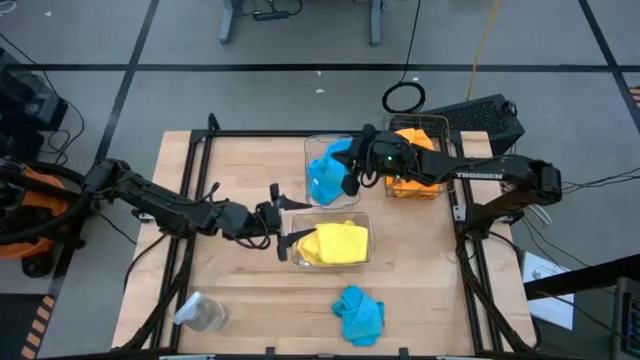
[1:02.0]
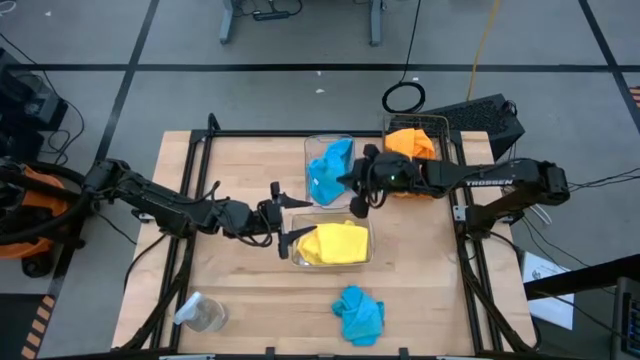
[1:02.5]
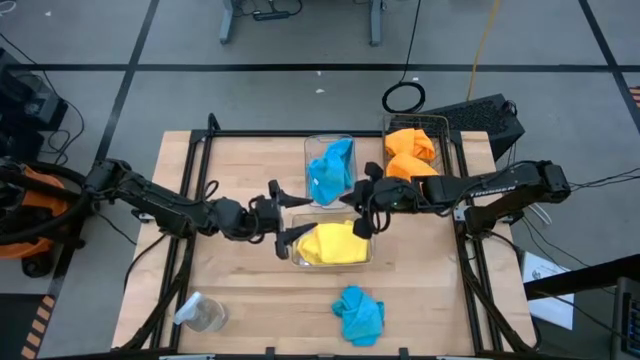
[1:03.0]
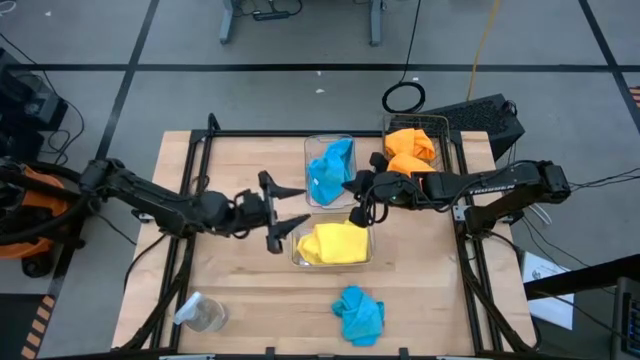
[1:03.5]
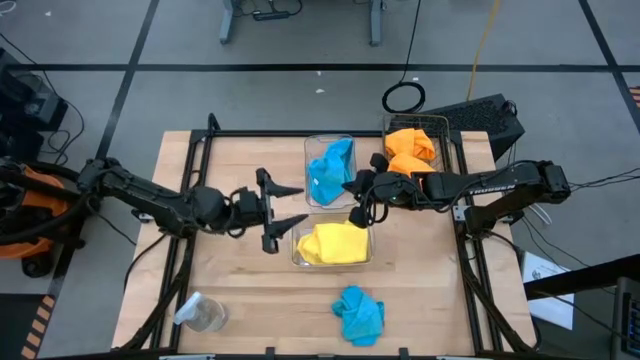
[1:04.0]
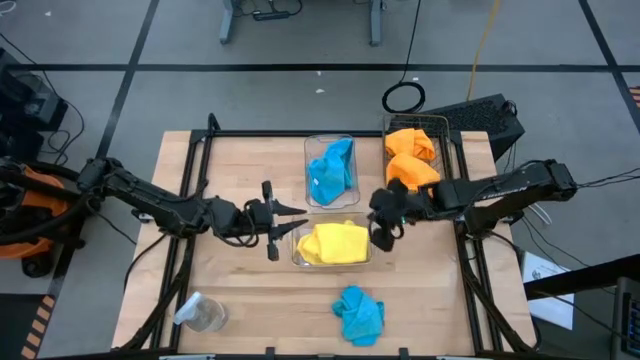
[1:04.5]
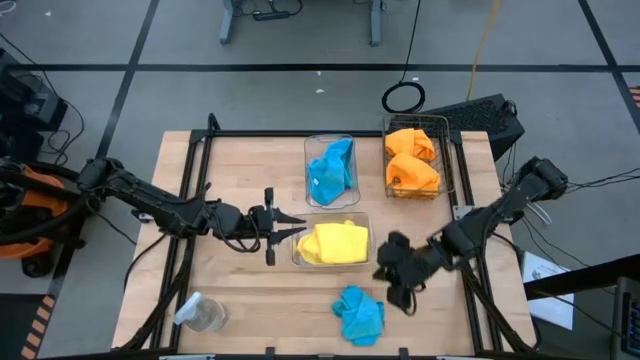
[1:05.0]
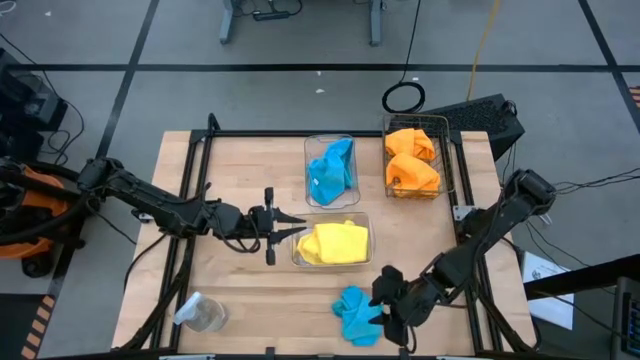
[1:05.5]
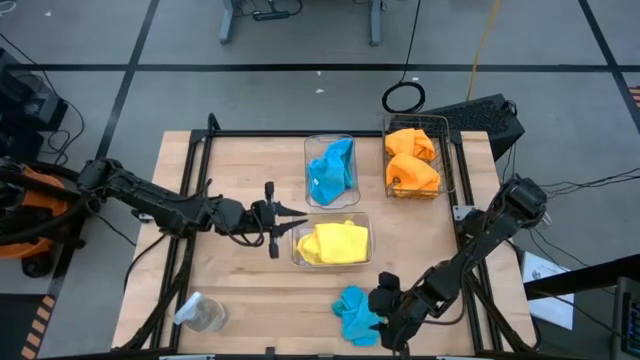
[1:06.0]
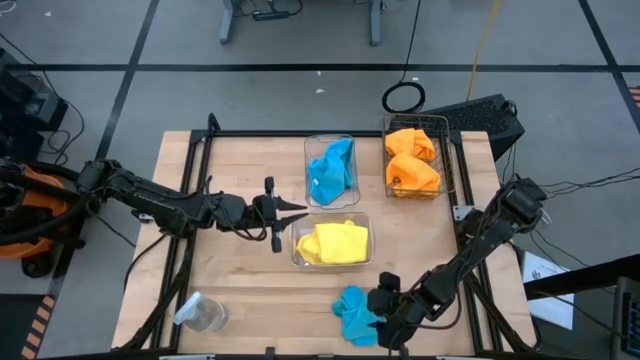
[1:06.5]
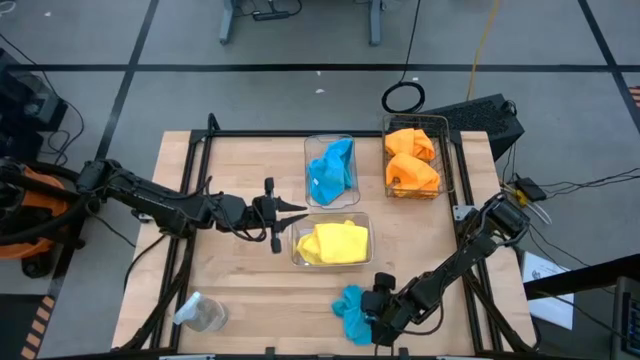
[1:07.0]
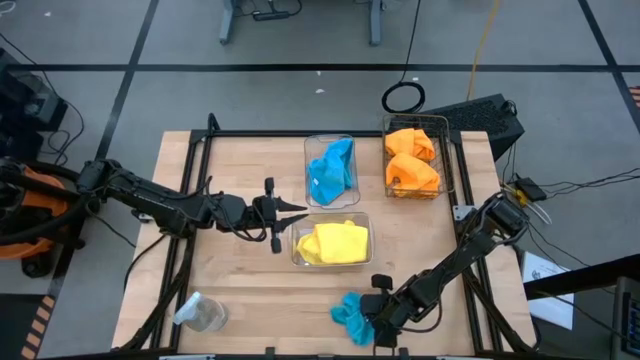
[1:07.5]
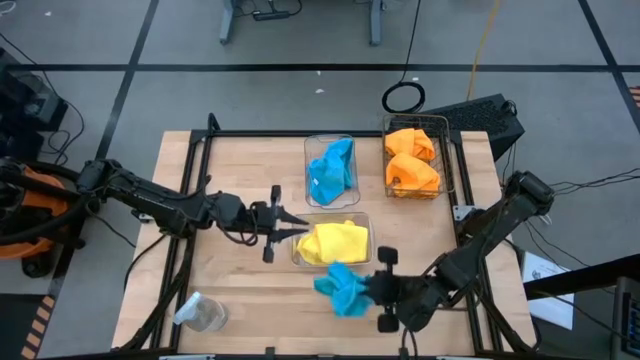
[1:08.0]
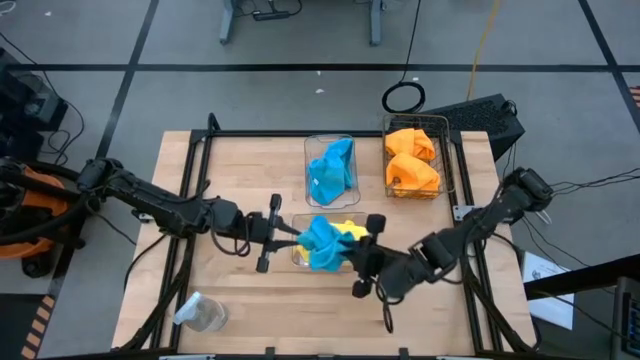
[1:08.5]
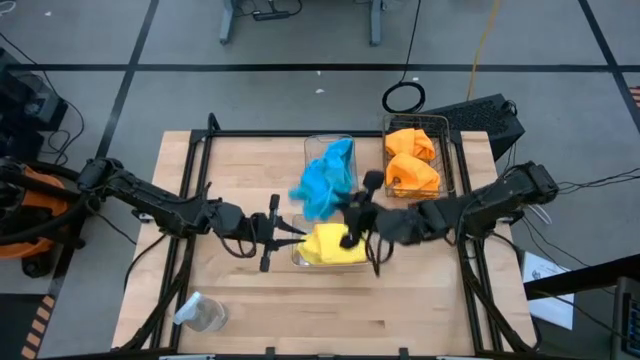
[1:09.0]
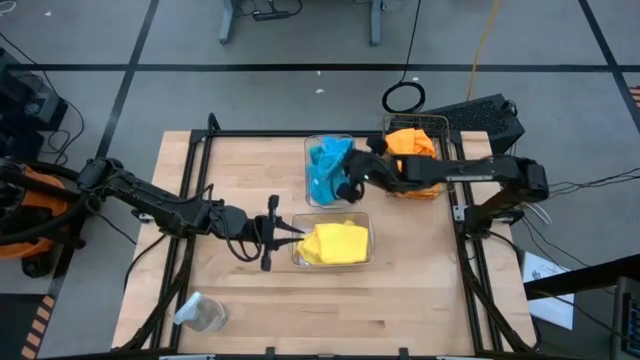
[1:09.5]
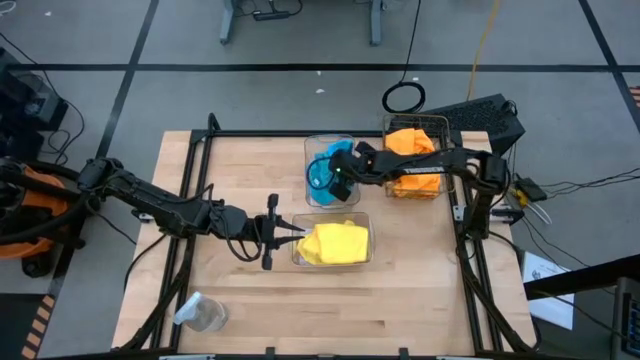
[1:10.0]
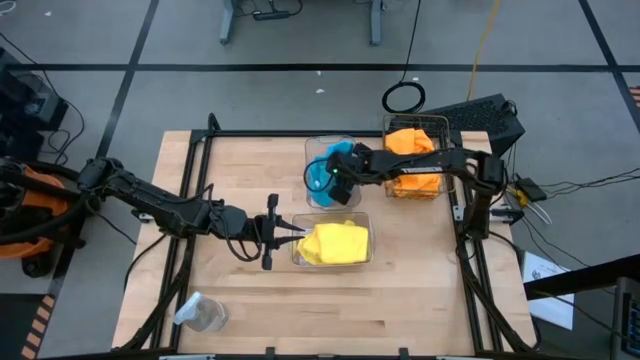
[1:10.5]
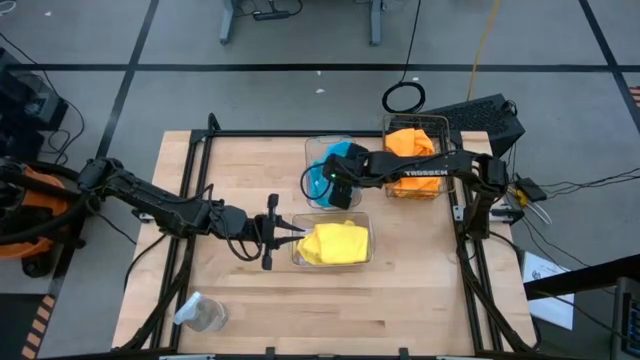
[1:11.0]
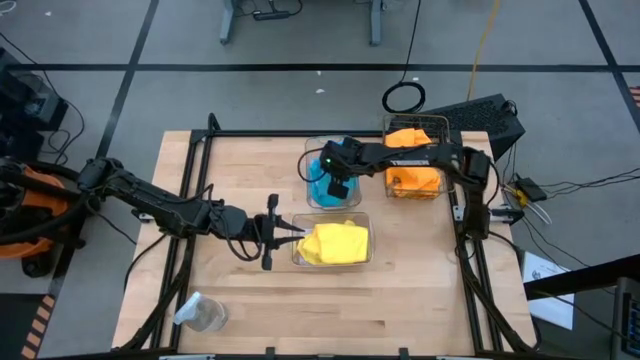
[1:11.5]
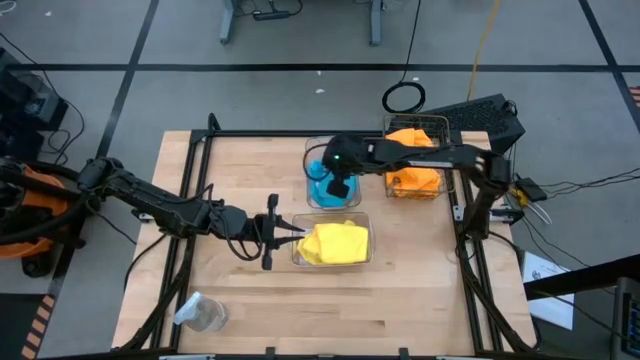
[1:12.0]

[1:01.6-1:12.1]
Task: Sort microfiber towel by color & place in baskets
Put the blue microfiber towel into the top transparent bin

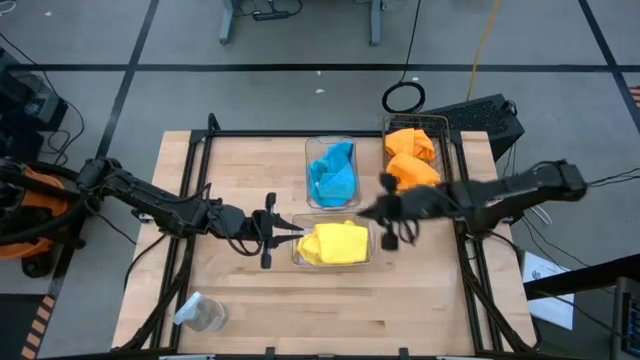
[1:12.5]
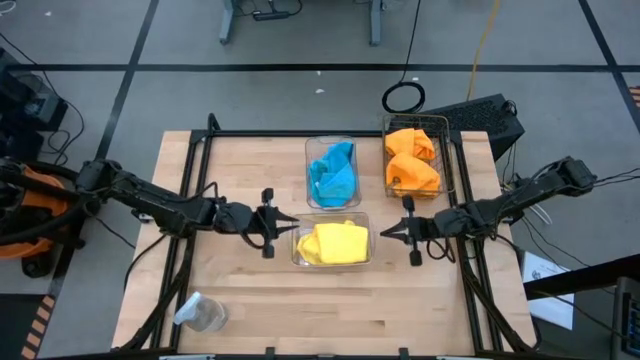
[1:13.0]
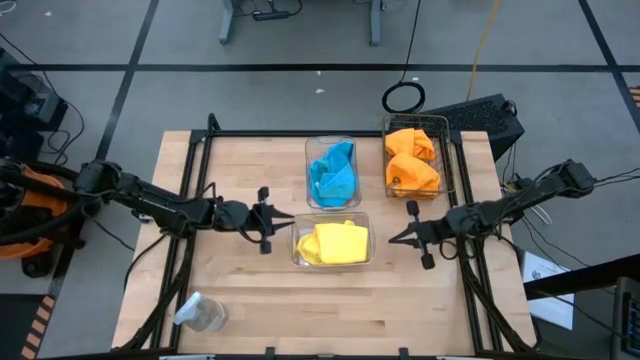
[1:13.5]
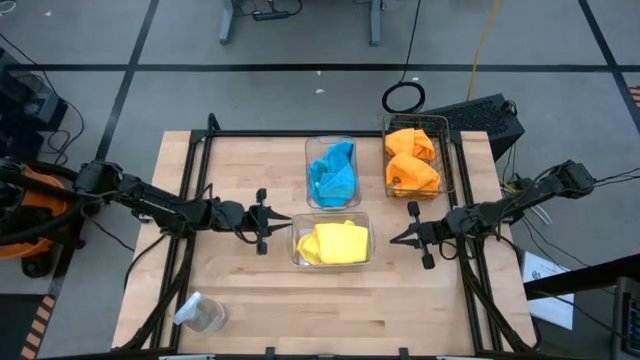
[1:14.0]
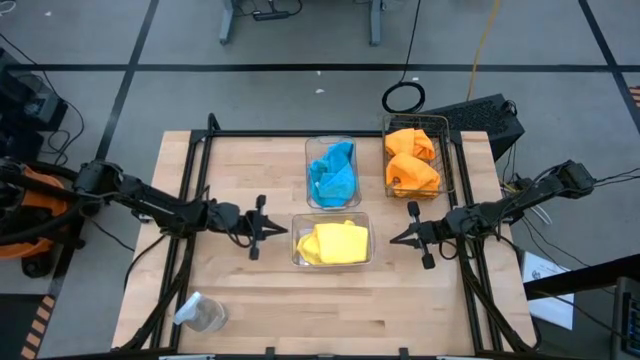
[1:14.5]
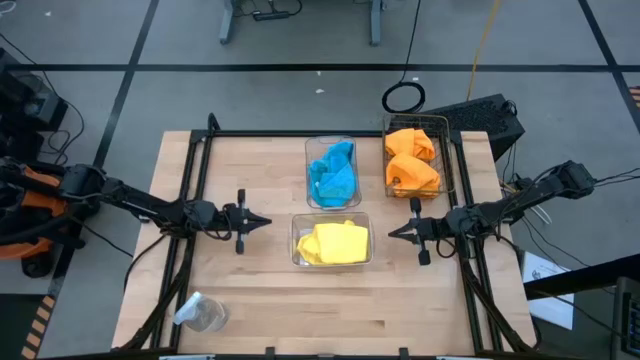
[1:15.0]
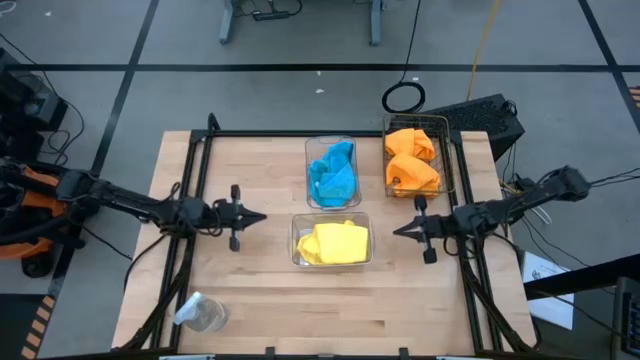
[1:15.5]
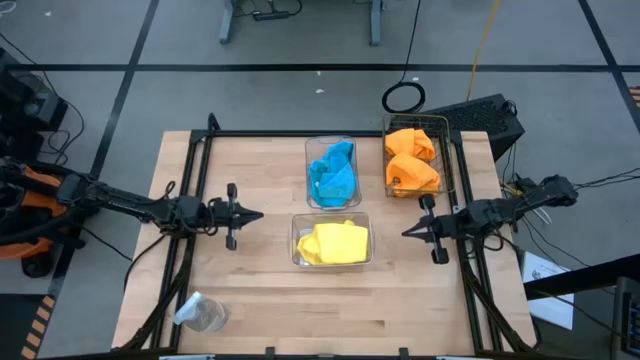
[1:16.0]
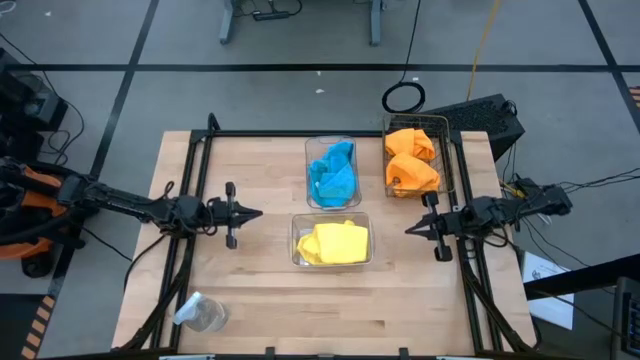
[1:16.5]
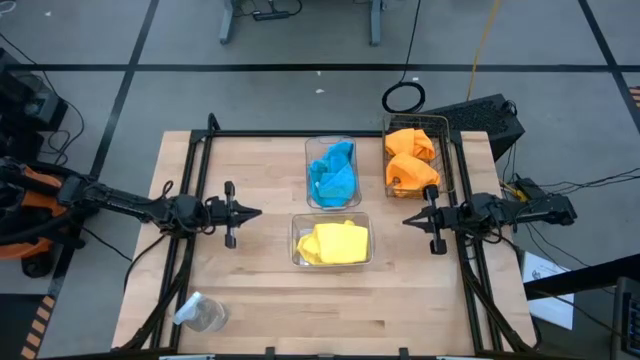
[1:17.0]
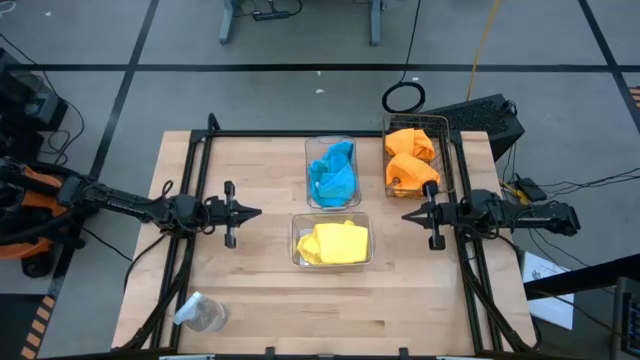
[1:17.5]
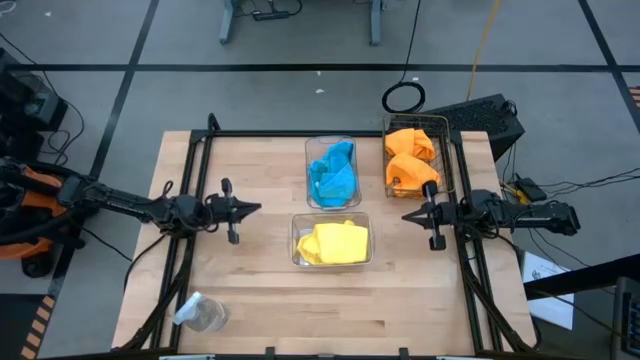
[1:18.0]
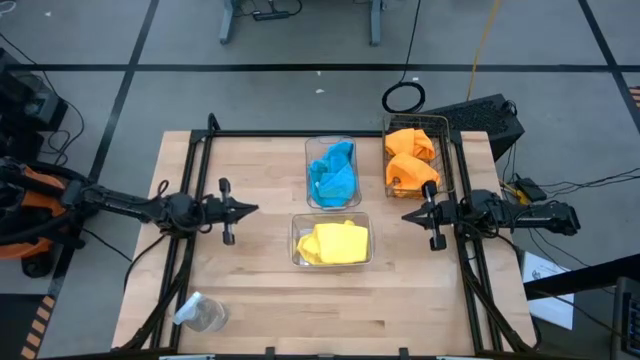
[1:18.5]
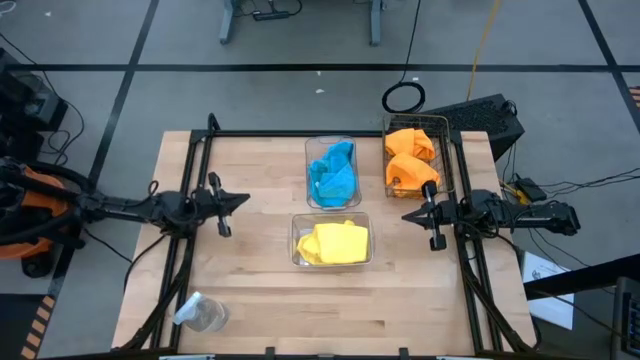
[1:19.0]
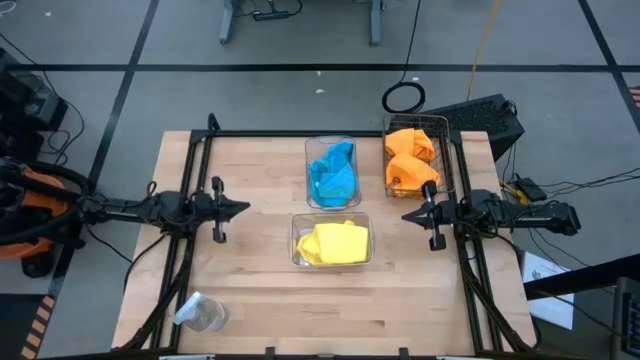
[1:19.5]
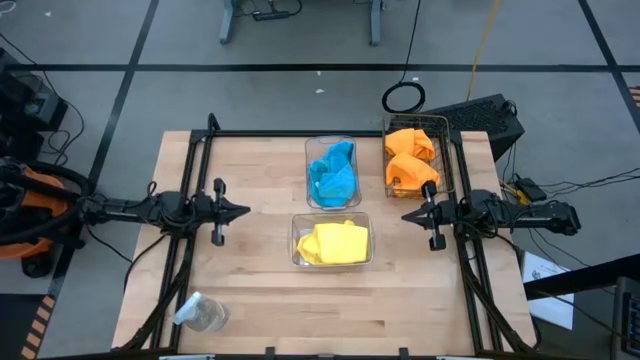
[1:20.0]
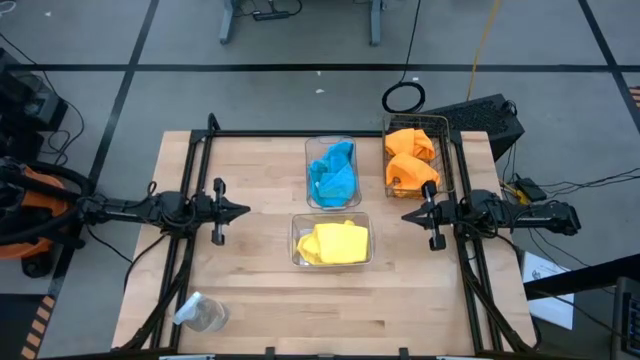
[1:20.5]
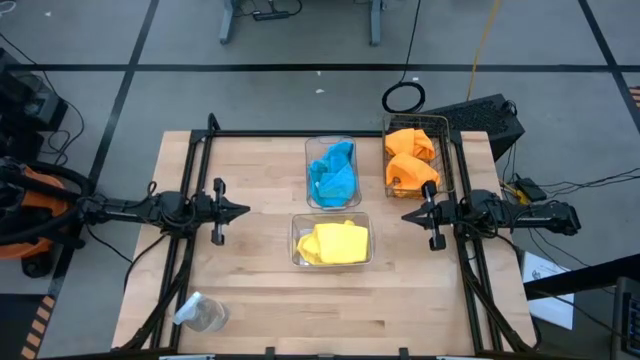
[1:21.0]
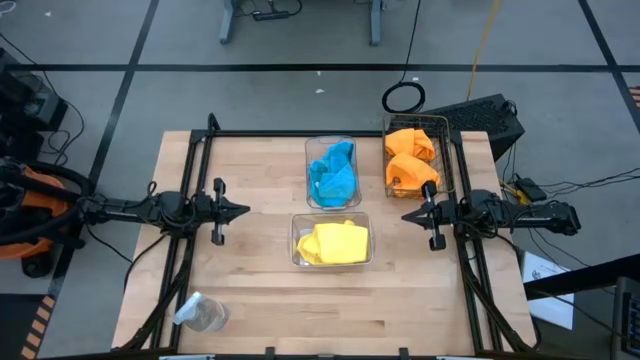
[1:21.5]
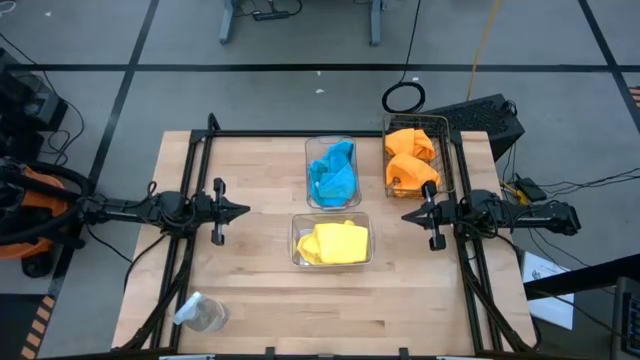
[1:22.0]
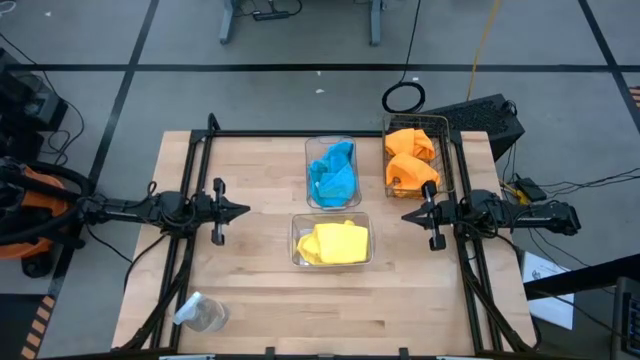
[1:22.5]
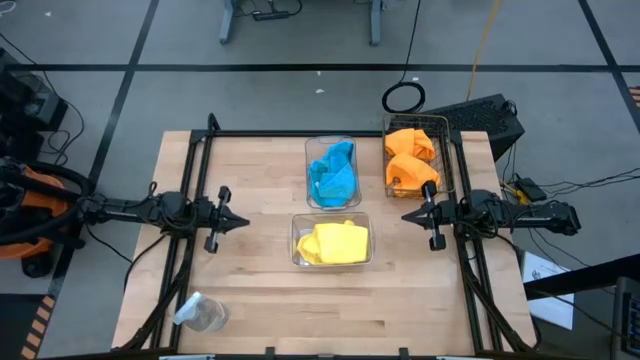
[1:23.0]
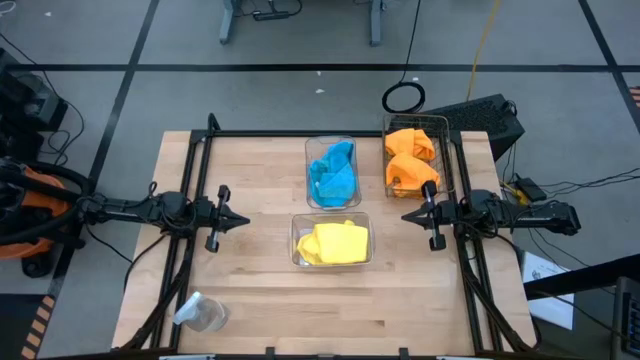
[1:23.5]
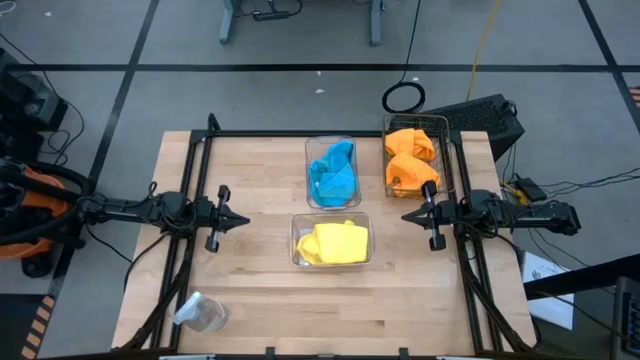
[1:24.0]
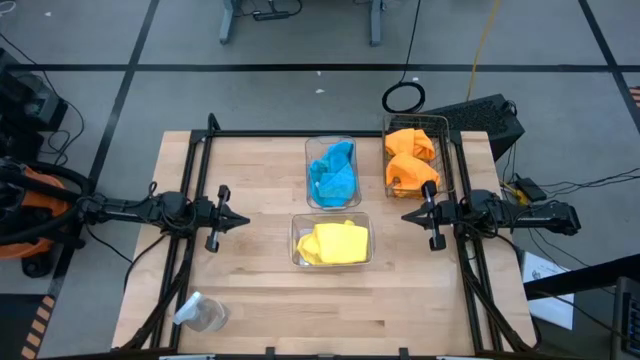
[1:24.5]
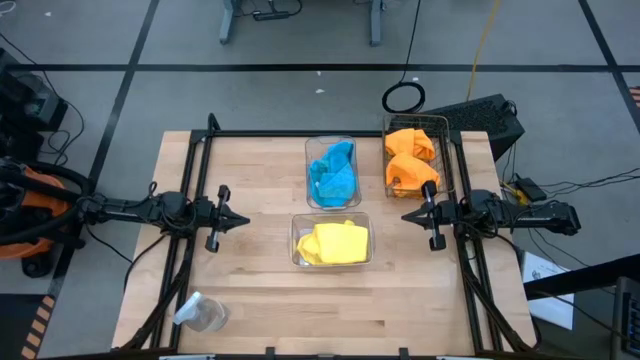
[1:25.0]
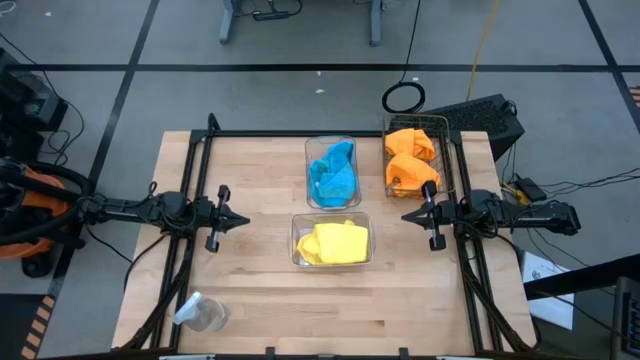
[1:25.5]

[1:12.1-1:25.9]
Return to Home Position
